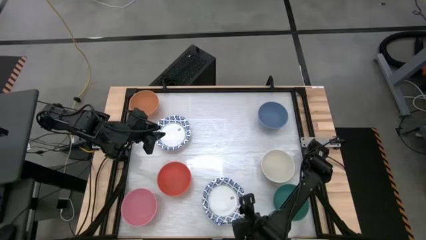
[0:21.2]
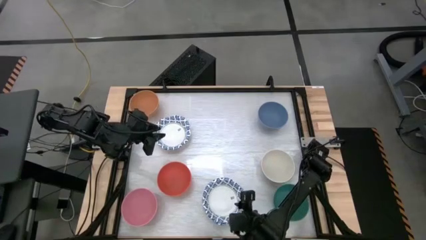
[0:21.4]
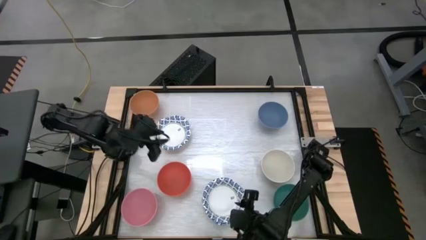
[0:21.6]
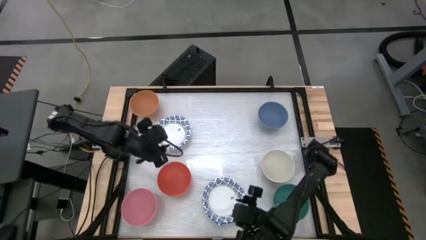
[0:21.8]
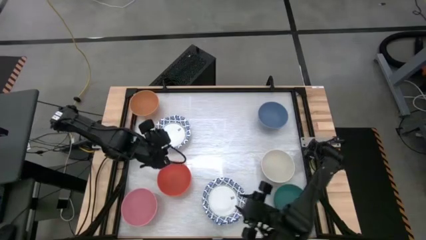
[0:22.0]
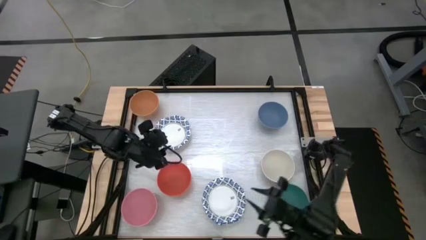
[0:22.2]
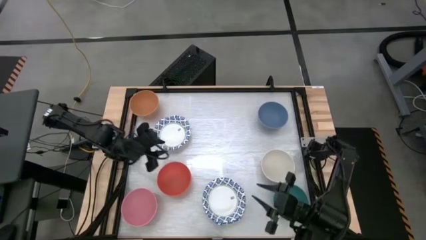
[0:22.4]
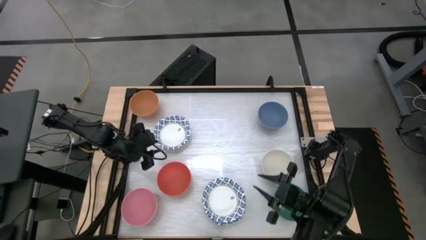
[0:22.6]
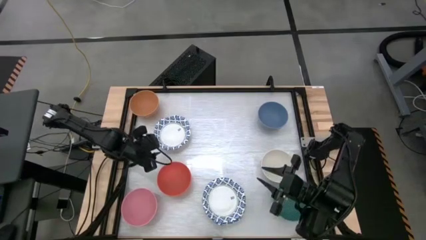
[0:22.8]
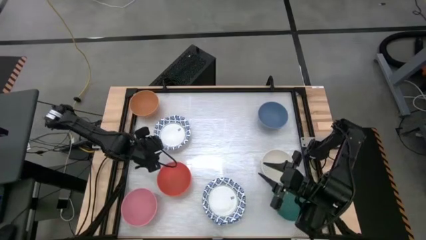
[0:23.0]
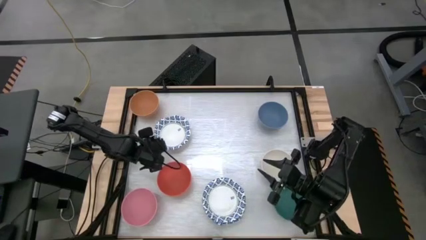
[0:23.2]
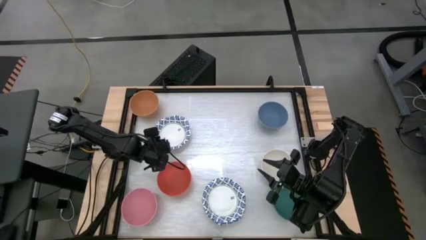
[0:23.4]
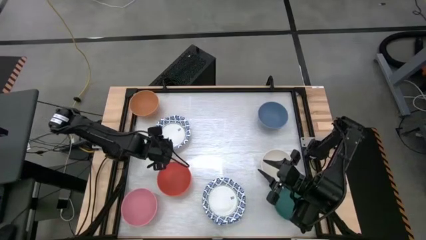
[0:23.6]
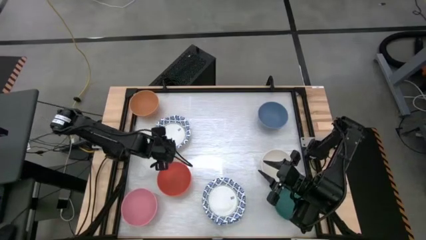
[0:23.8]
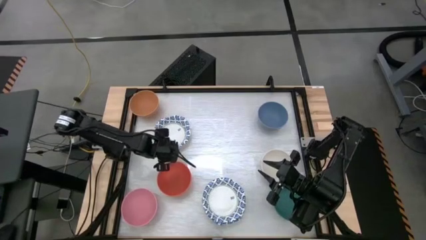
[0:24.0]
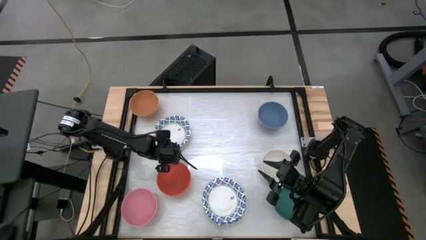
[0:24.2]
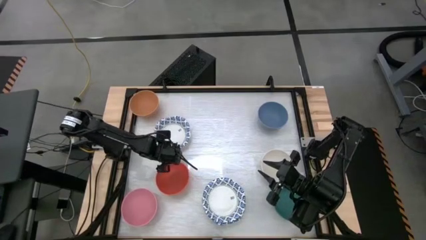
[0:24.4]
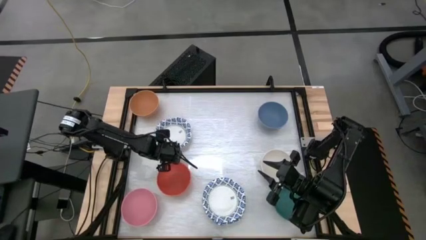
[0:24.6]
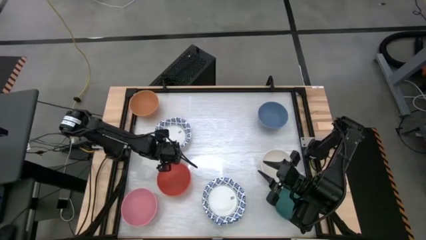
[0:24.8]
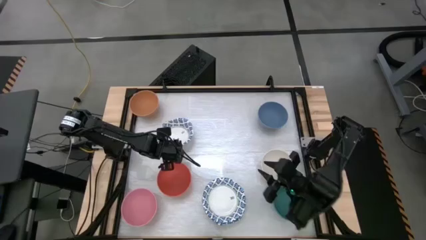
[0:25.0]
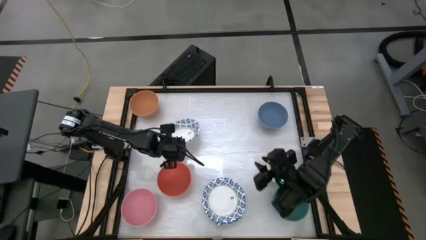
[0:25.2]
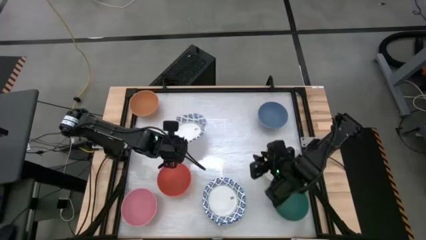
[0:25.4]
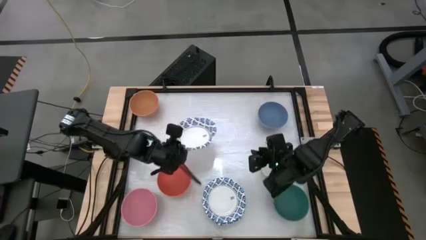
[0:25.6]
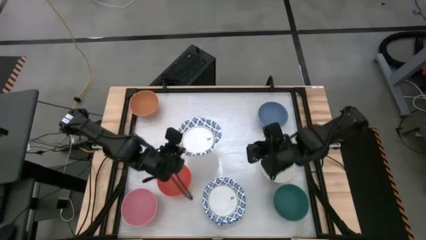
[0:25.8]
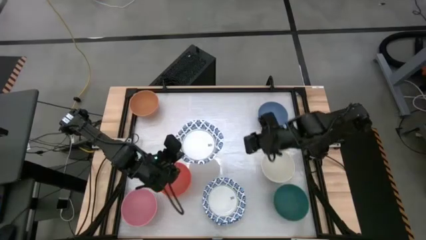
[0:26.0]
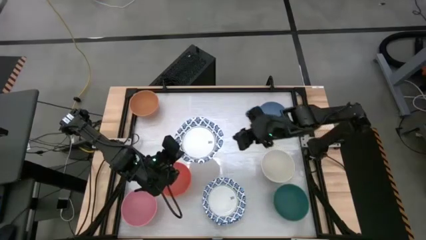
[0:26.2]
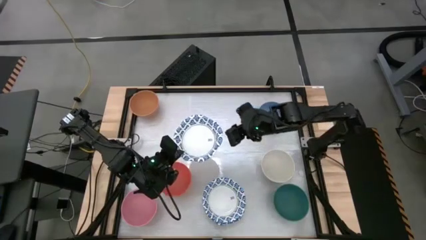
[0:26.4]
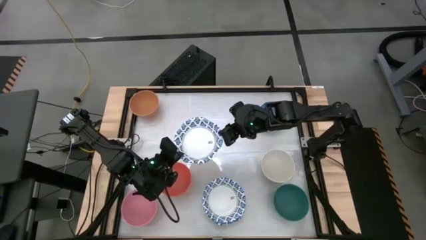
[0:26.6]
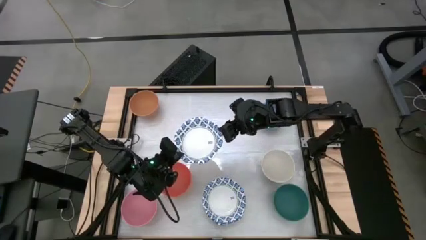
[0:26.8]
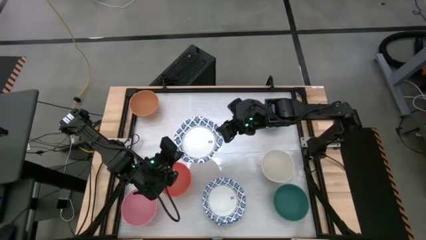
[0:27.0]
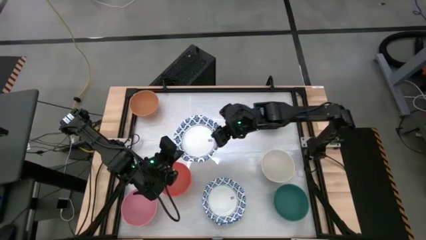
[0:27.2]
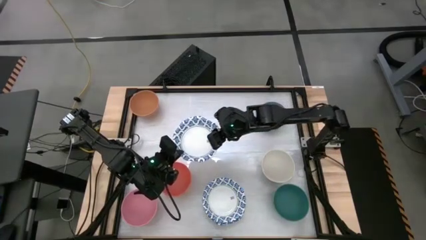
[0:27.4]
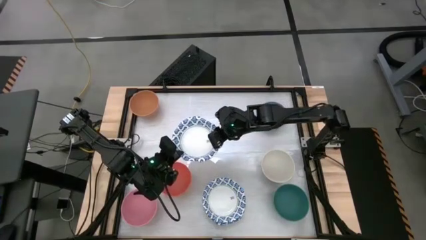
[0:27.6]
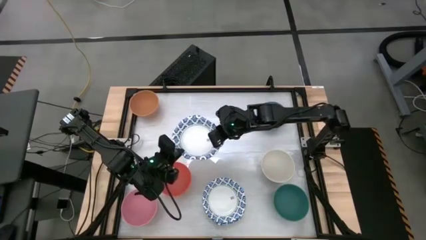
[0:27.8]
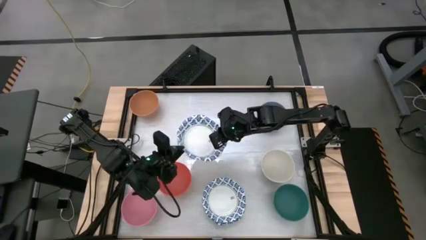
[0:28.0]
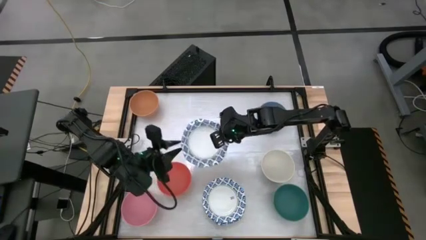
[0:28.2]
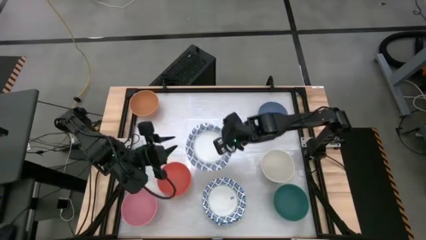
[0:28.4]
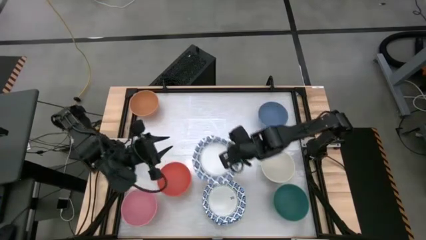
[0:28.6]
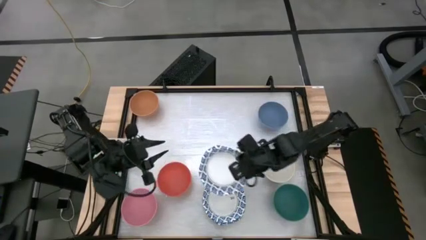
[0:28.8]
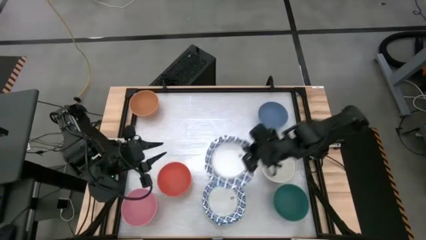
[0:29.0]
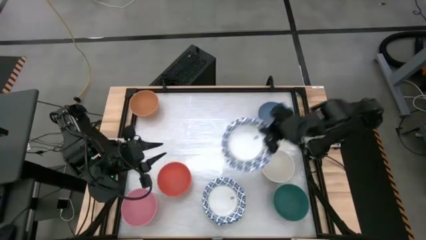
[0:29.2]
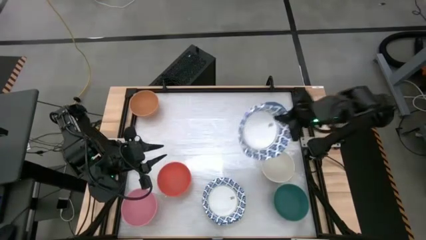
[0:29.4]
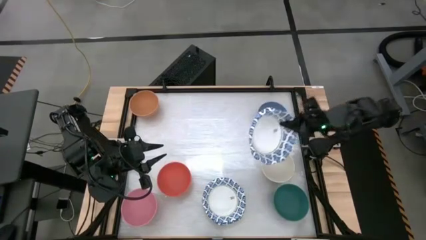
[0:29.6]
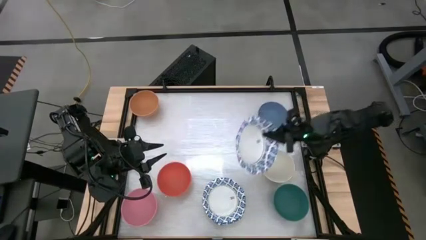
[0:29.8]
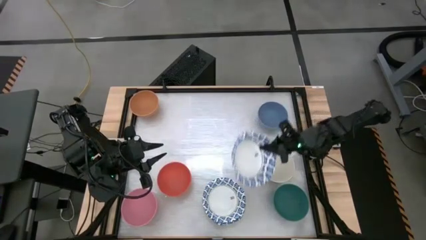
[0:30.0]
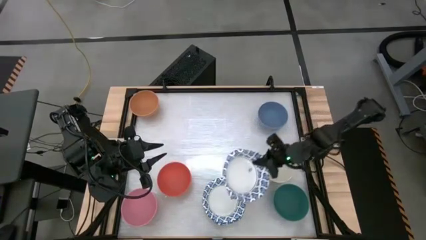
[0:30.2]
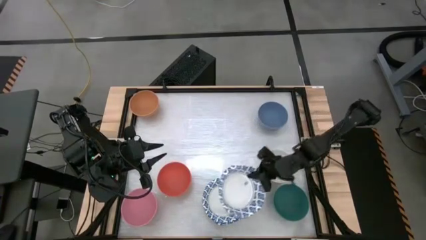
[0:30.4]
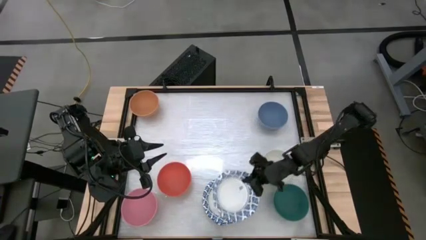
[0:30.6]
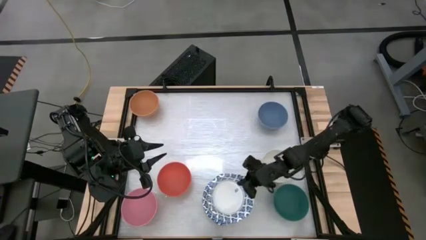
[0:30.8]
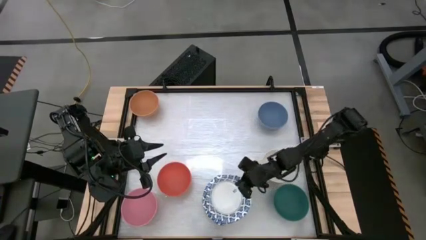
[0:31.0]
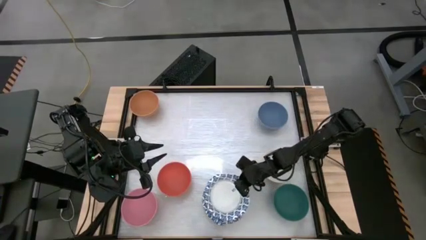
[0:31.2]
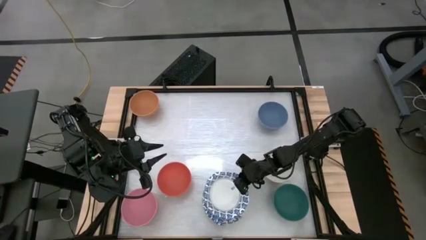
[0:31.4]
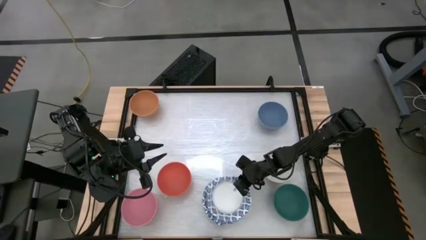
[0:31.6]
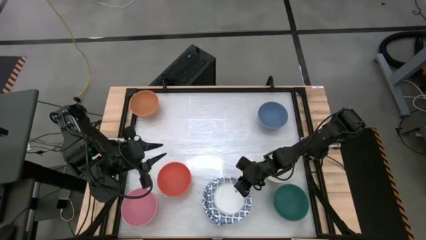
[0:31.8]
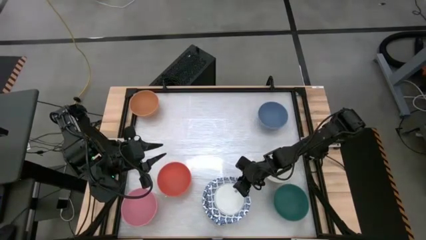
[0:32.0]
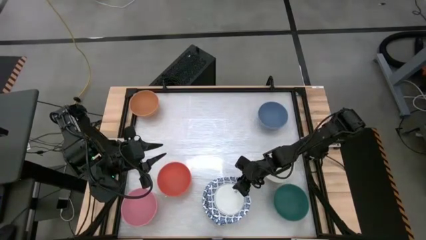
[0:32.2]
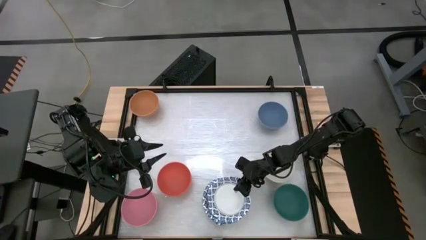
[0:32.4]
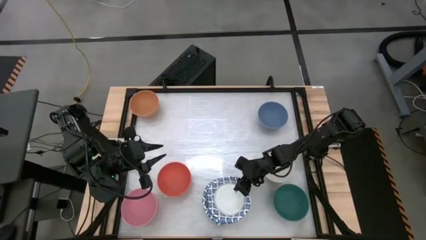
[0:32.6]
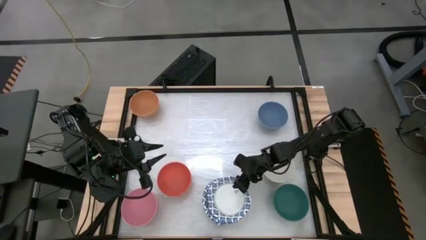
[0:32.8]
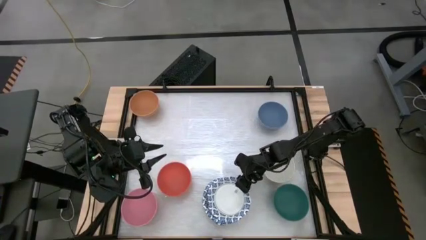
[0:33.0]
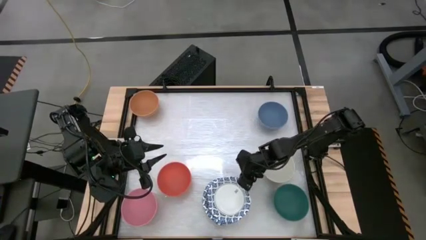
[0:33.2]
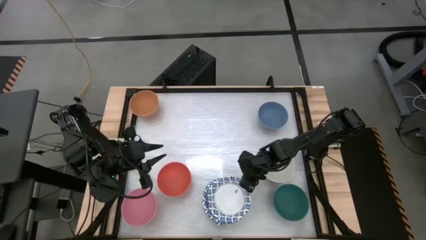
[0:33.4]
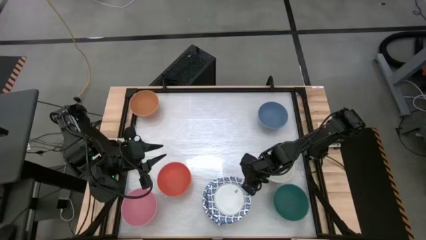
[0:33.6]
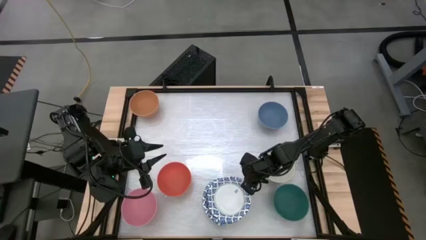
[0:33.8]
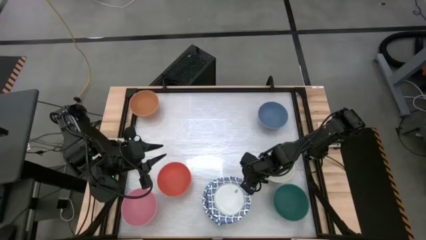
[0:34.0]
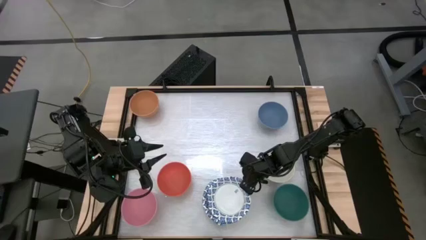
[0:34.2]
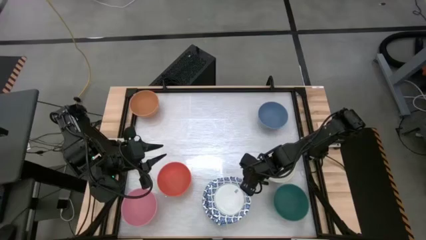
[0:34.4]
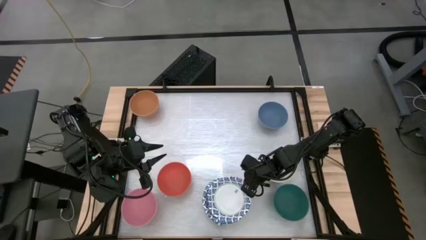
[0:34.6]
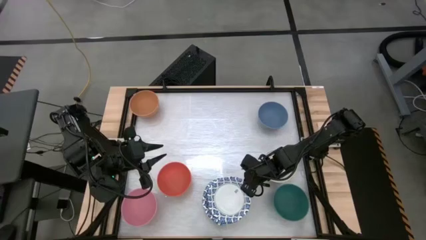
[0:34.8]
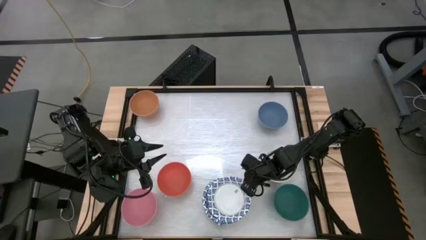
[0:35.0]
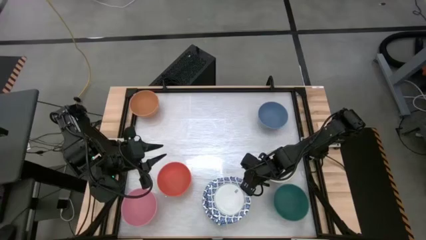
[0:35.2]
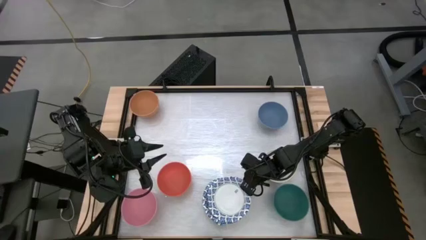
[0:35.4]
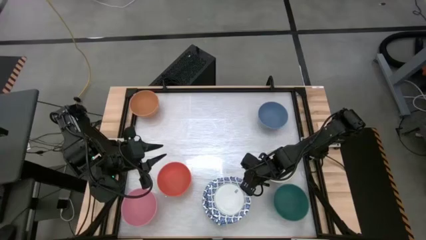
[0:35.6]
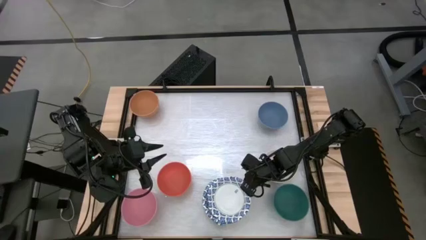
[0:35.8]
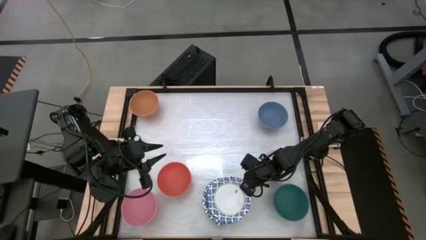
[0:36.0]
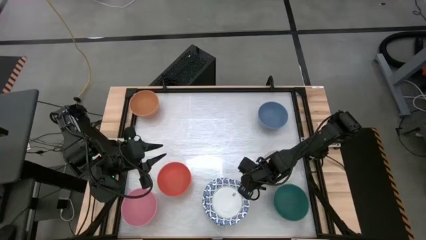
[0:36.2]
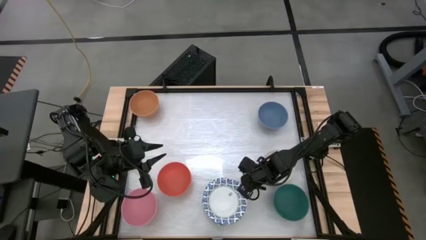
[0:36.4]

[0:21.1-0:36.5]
Task: Nest bowls inside each other by size order
Stack the white patterned bowl on top of the white patterned bowl
